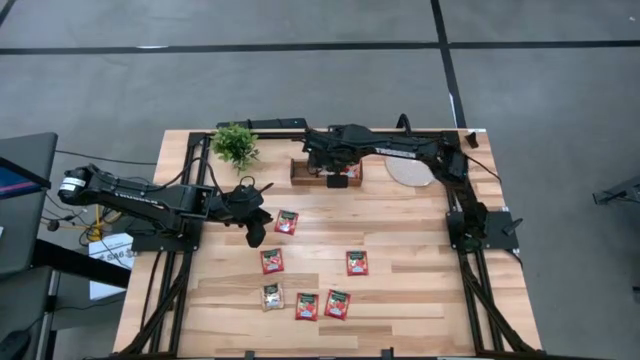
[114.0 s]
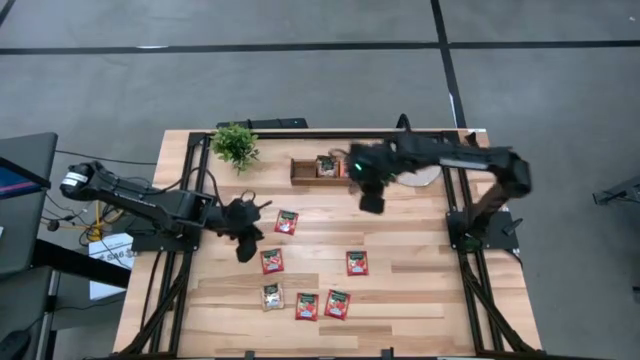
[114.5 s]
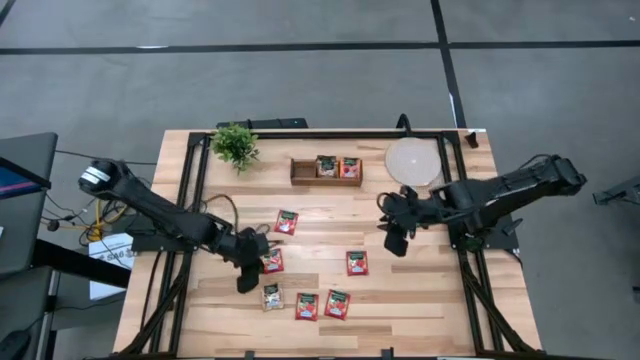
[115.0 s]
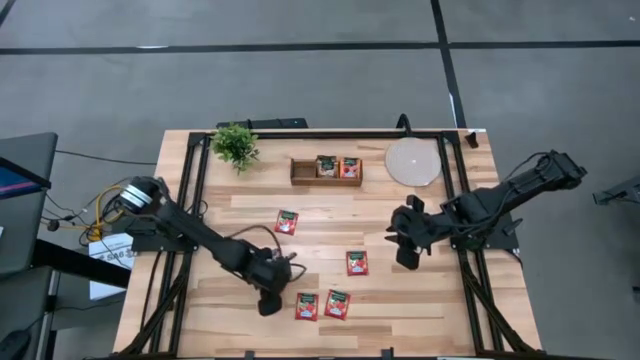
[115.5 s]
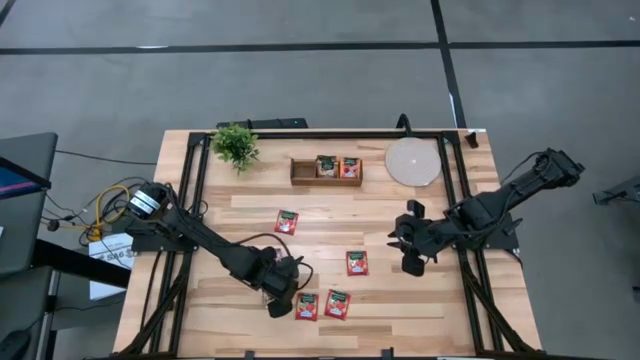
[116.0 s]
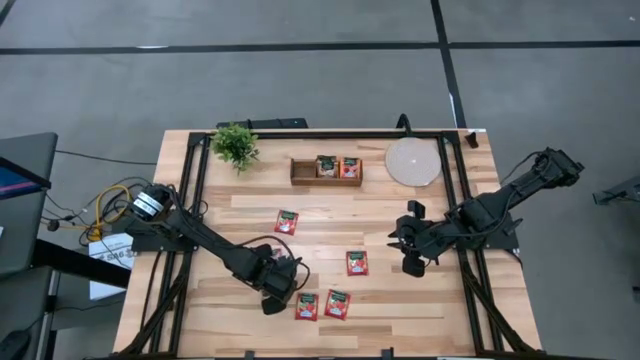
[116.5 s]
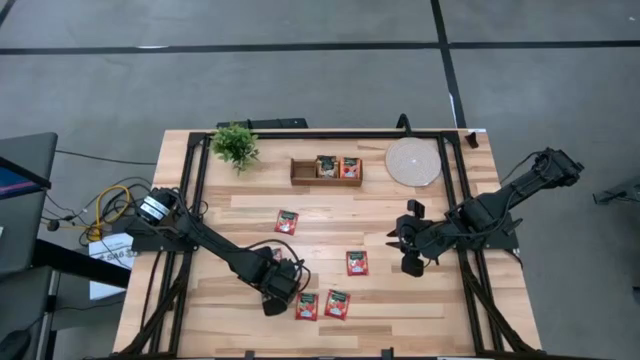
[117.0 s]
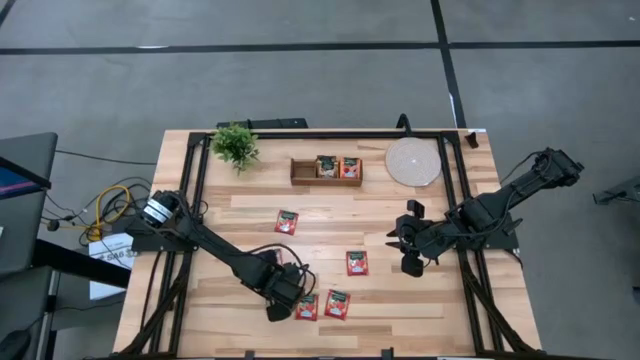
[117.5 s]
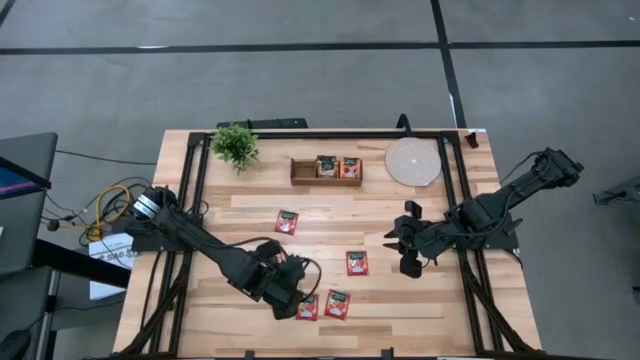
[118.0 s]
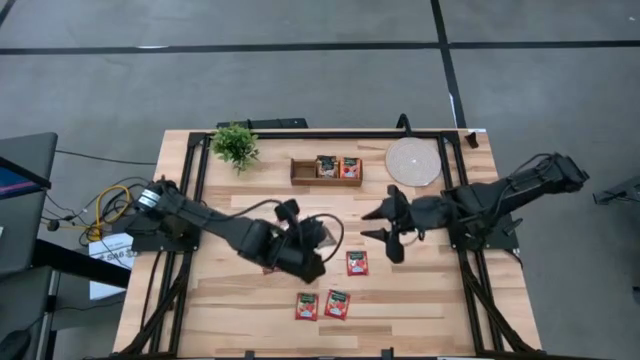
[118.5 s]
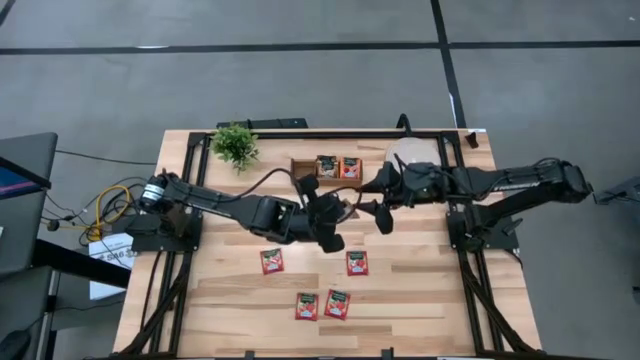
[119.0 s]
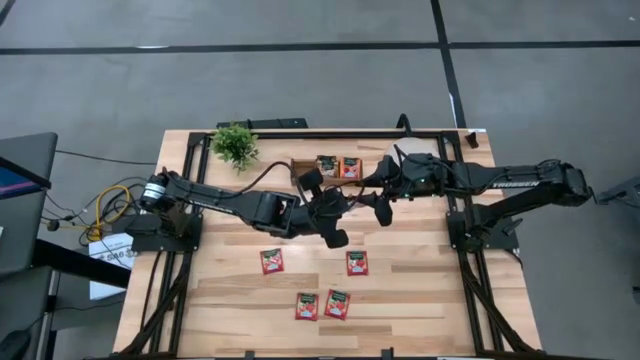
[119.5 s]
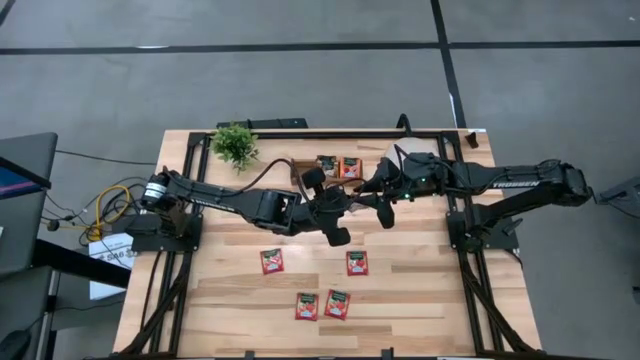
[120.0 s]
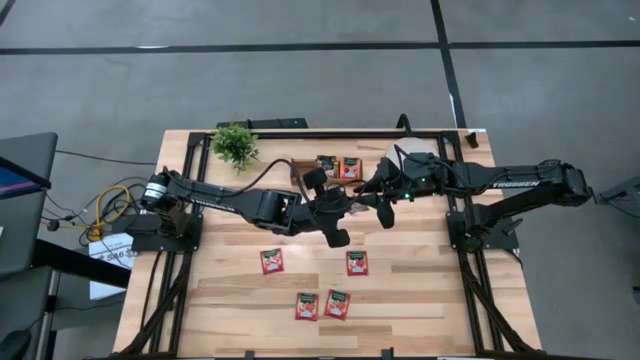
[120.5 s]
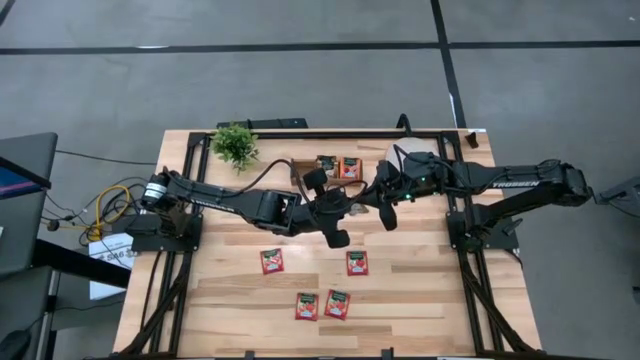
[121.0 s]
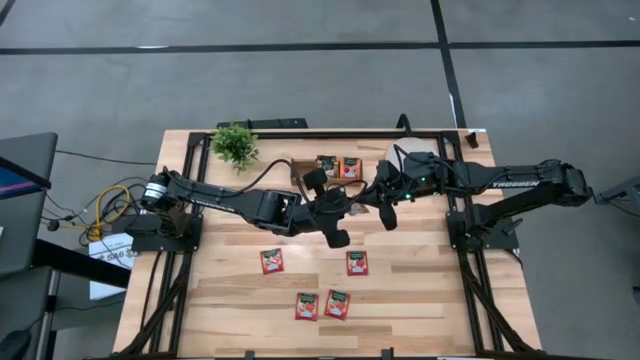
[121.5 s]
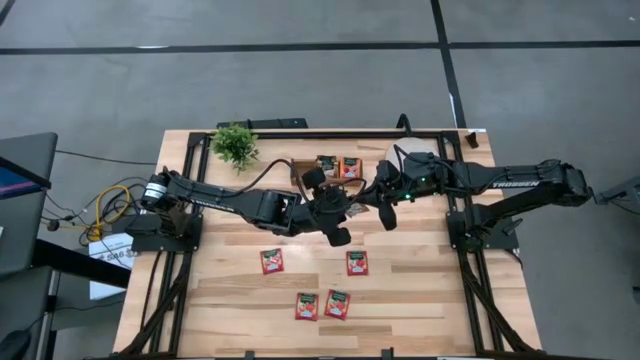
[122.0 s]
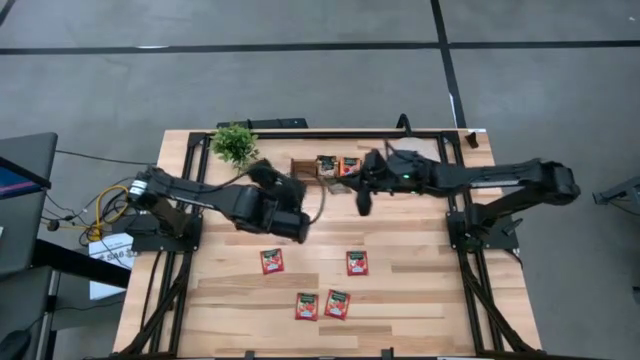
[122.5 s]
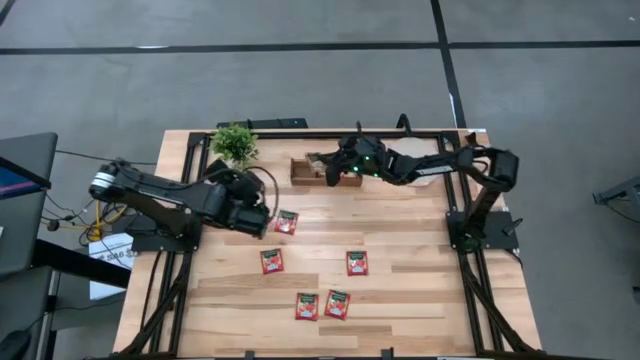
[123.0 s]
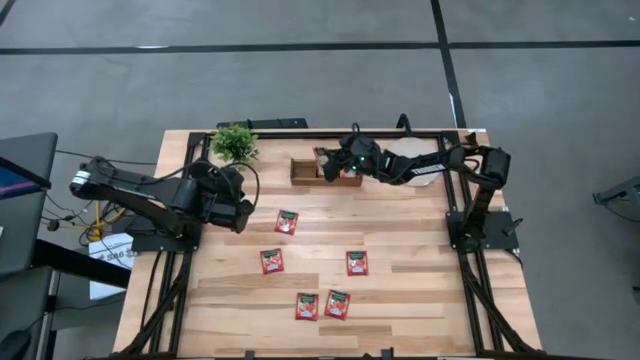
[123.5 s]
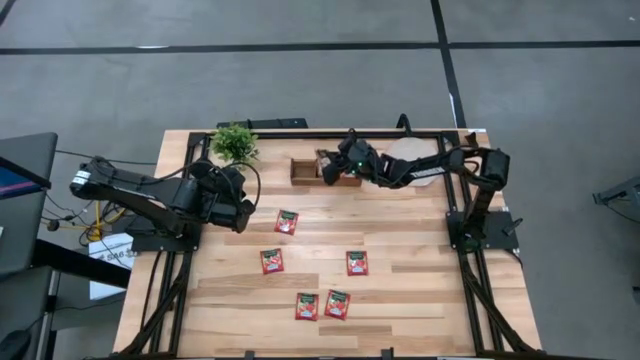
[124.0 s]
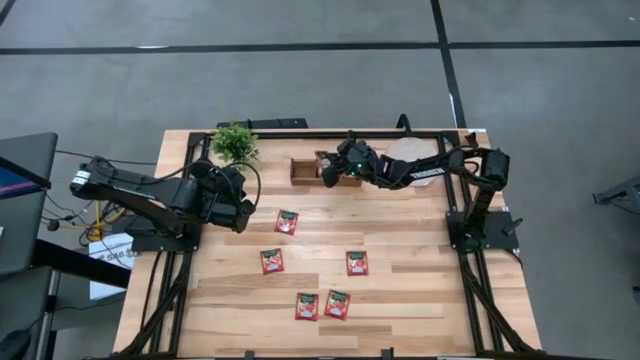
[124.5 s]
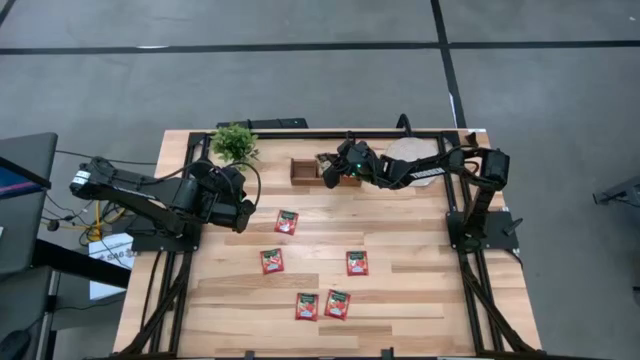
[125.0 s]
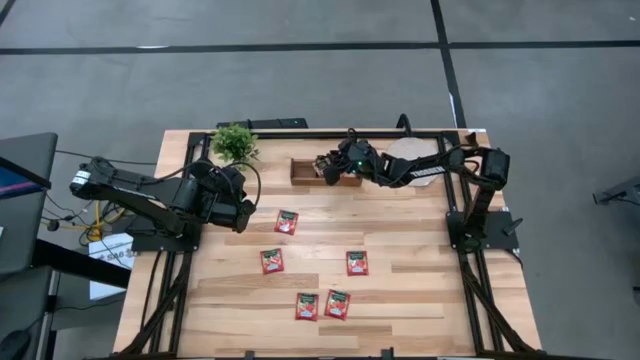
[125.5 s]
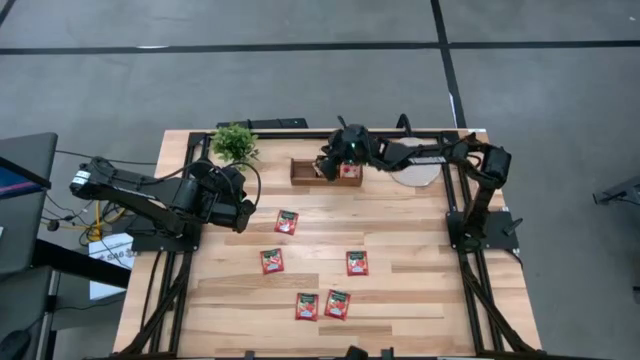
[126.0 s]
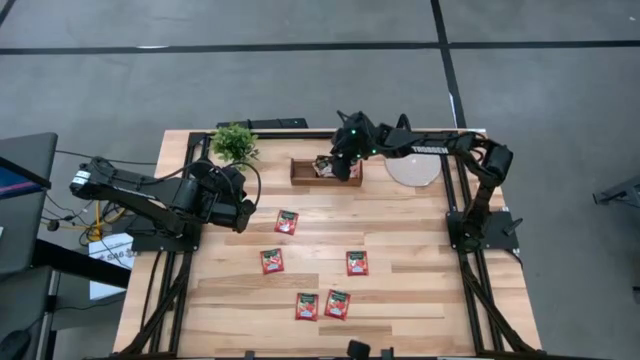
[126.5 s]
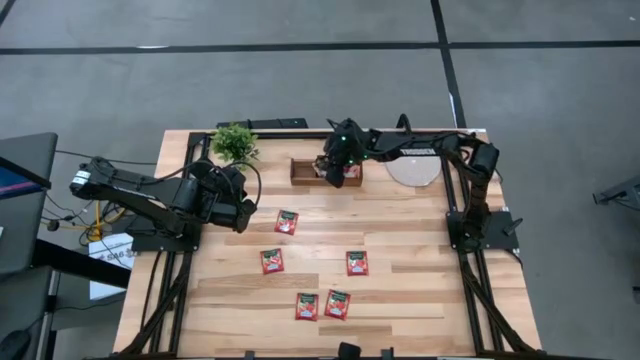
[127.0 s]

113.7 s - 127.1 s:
Task: Pick & Place Tea
Put the brown tea bag into the middle section of the wooden organizer

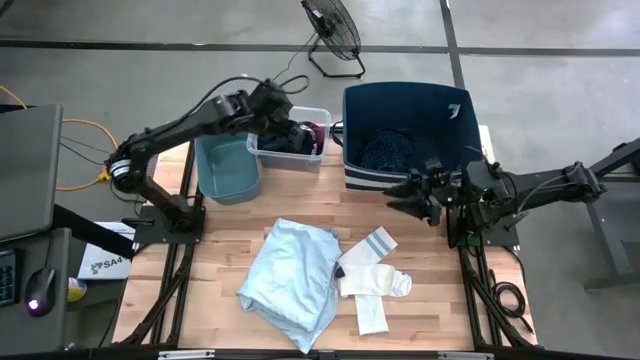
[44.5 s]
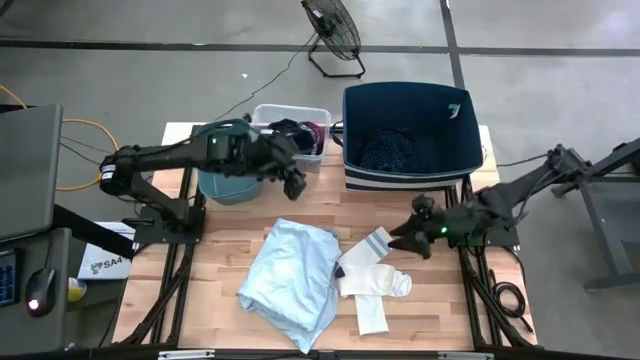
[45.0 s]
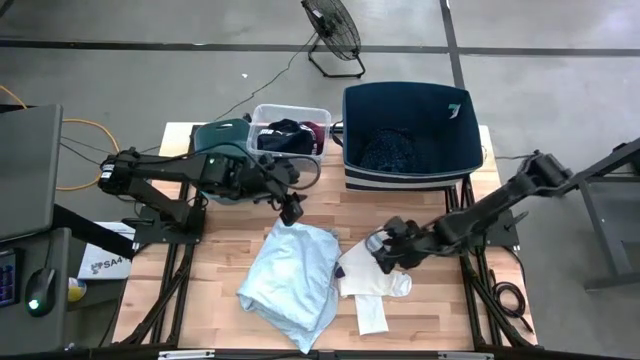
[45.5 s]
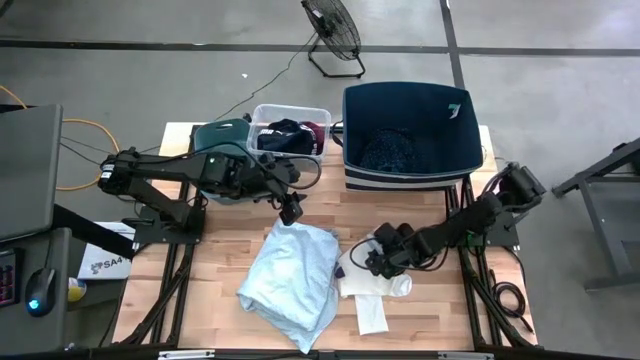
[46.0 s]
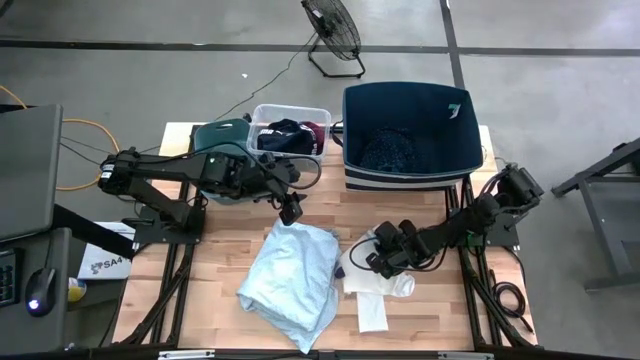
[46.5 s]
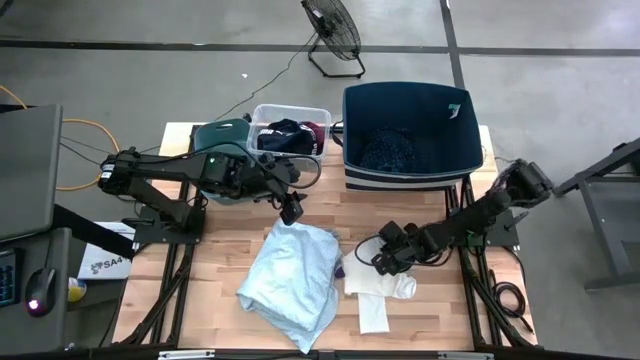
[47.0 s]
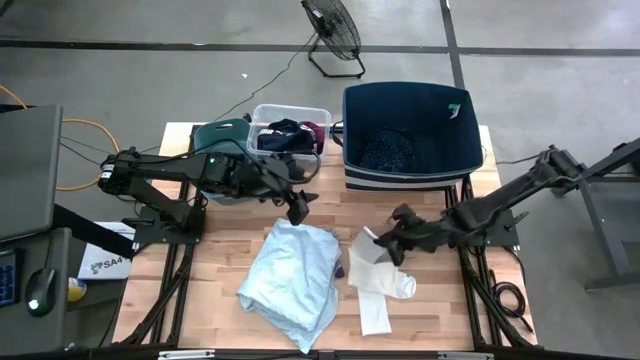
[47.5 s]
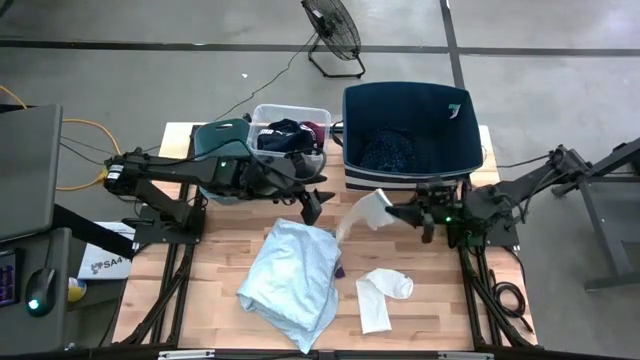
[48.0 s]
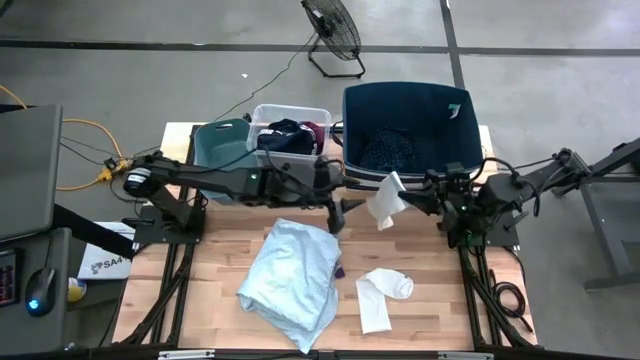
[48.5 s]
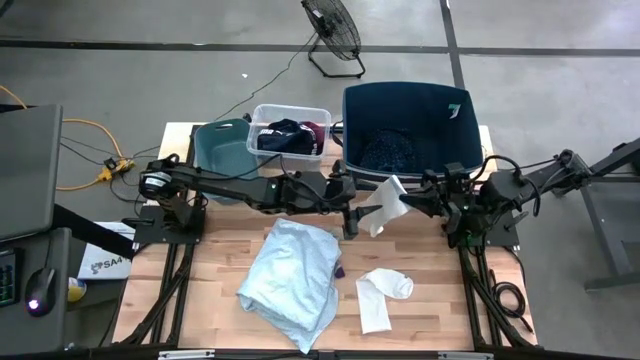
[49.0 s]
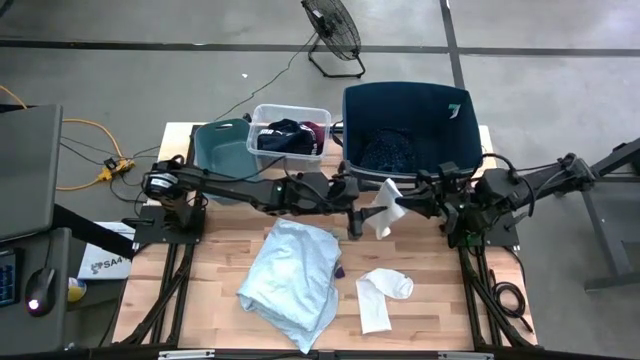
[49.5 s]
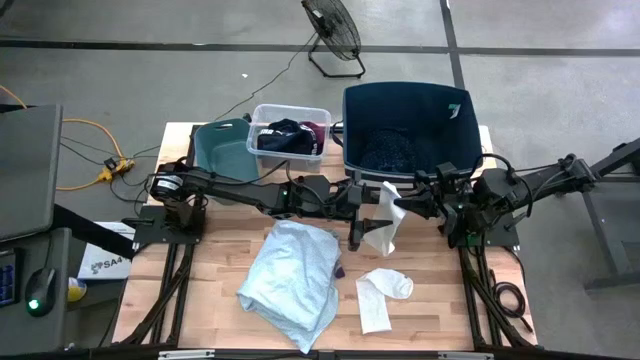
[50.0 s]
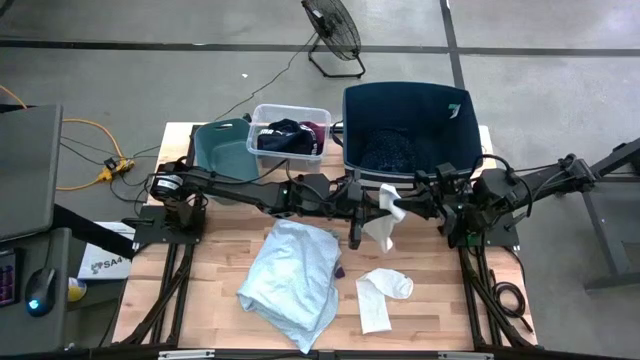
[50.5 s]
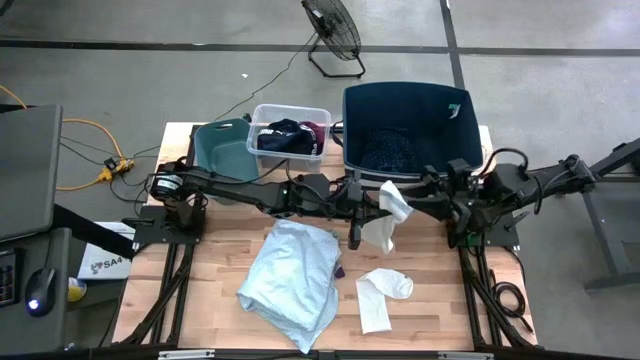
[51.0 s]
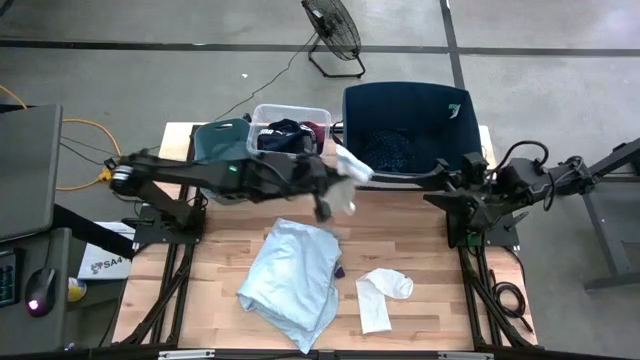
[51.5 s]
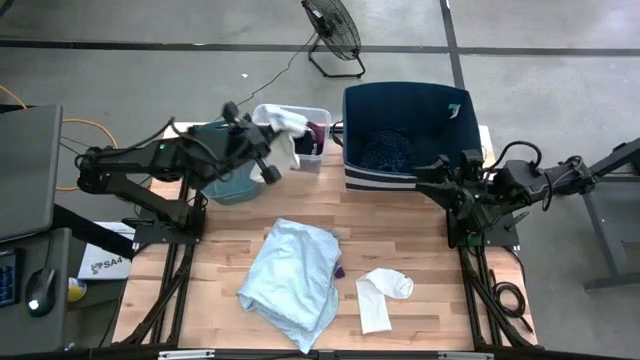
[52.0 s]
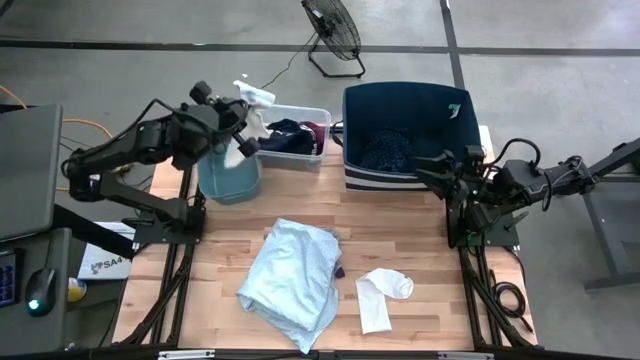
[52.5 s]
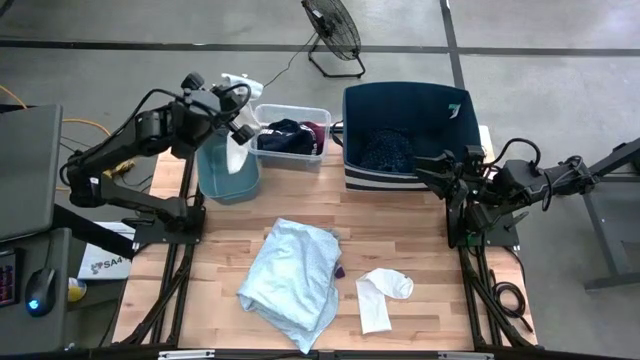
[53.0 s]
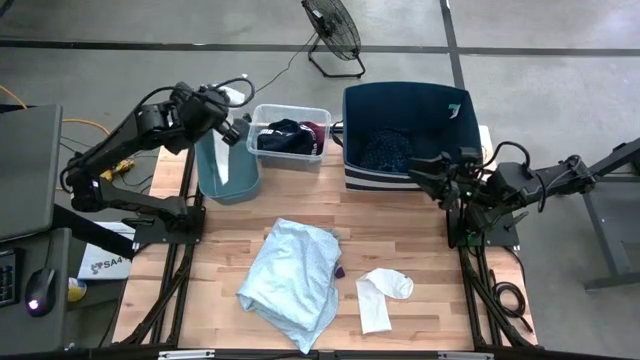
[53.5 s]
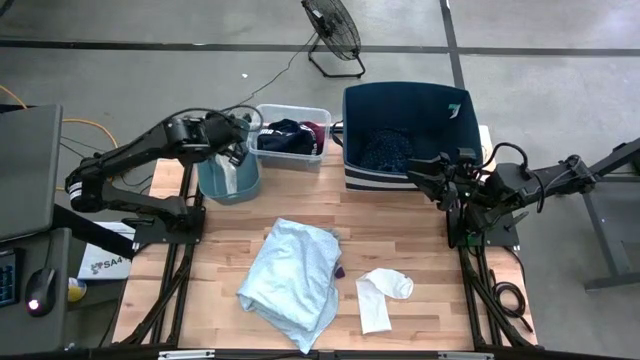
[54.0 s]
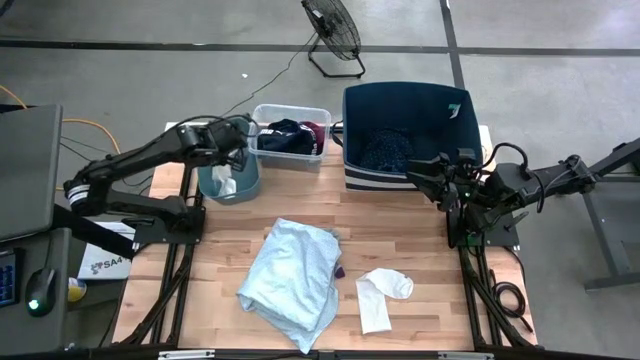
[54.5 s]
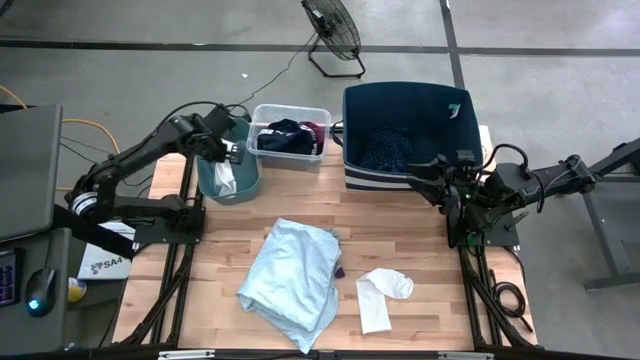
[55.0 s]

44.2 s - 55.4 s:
Task: Pick & Place Cloths
Put the pink sock into the blue bin
